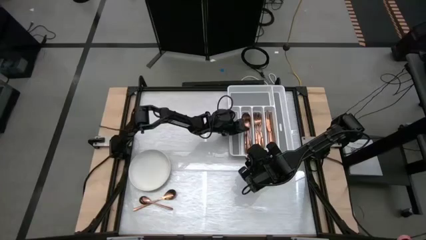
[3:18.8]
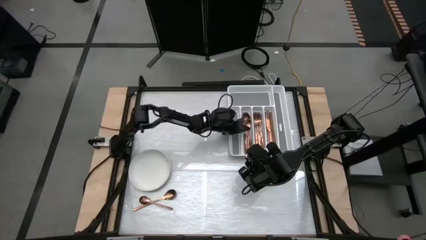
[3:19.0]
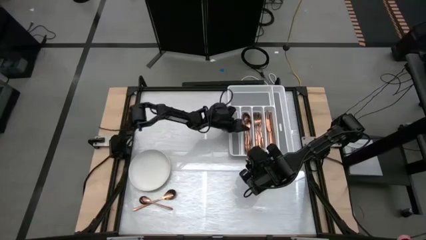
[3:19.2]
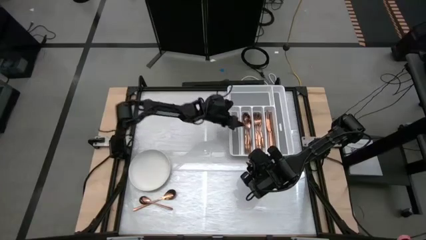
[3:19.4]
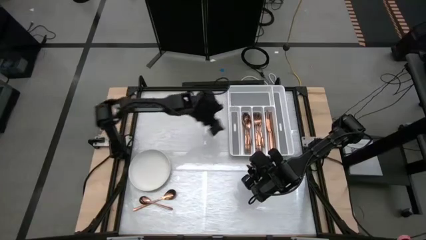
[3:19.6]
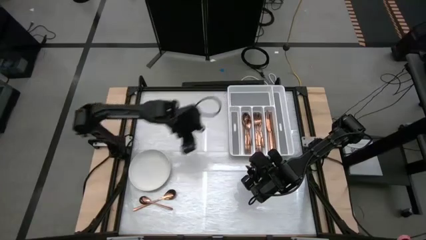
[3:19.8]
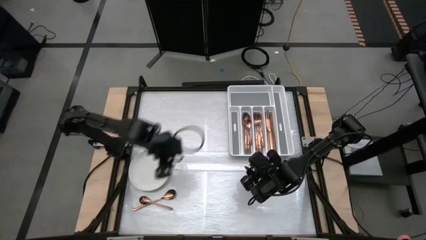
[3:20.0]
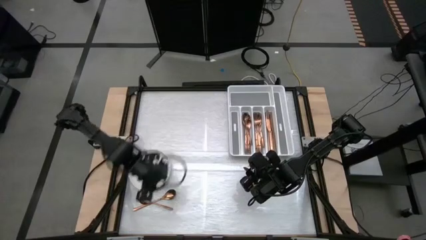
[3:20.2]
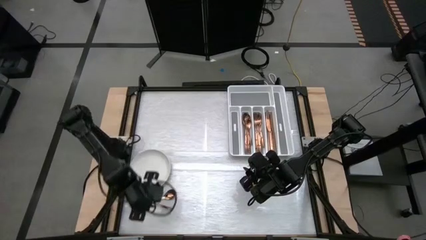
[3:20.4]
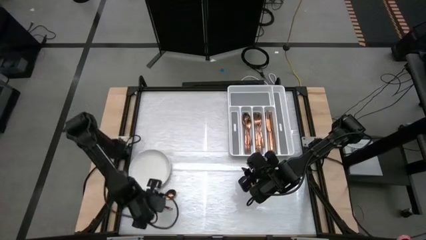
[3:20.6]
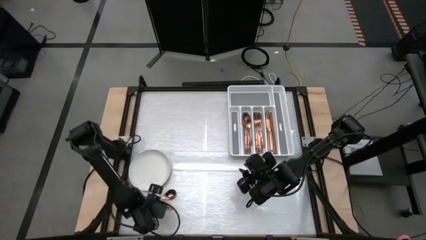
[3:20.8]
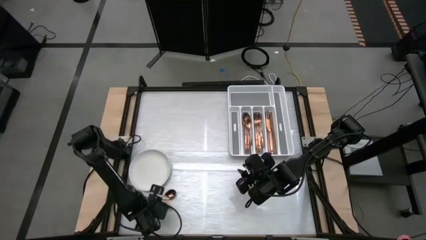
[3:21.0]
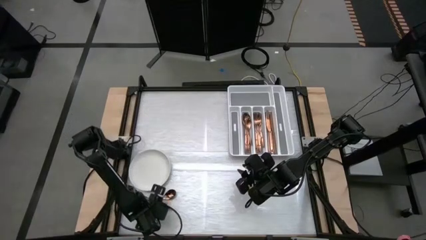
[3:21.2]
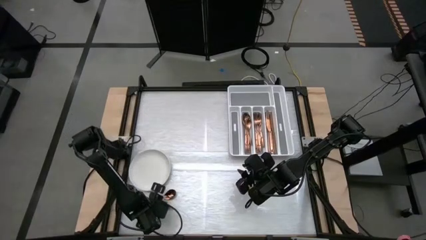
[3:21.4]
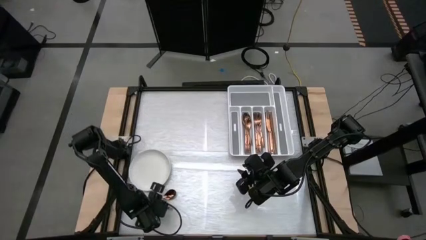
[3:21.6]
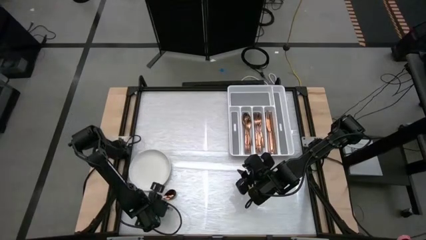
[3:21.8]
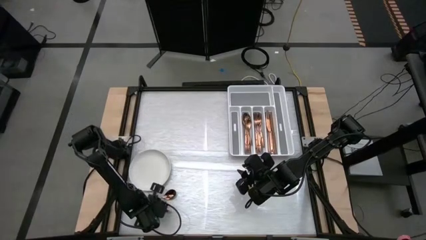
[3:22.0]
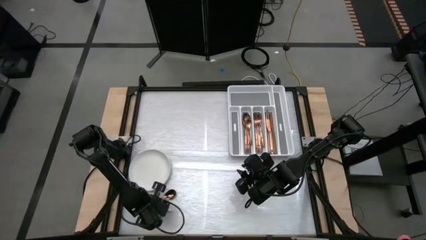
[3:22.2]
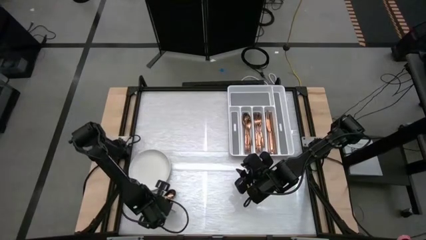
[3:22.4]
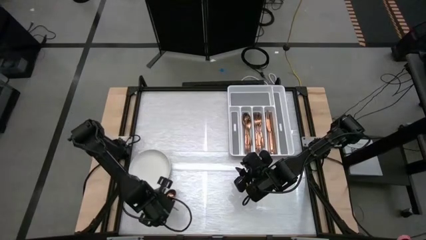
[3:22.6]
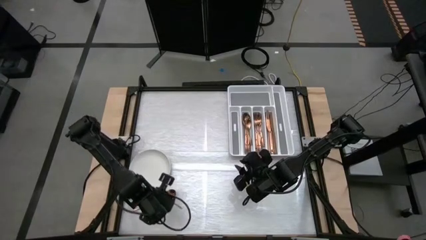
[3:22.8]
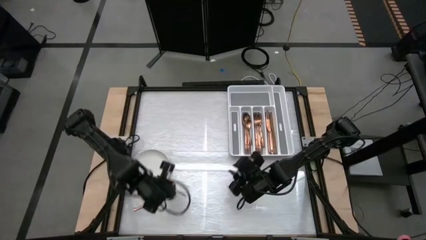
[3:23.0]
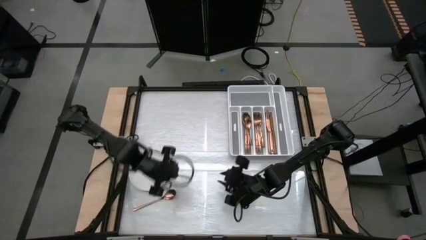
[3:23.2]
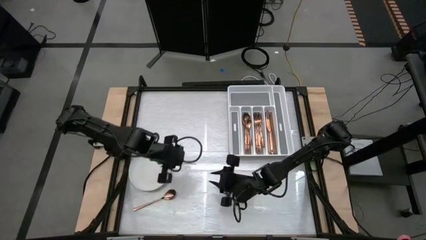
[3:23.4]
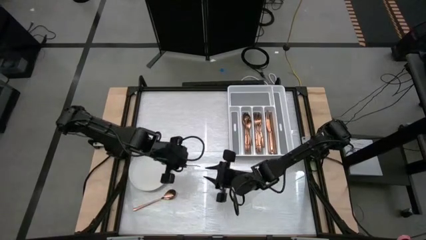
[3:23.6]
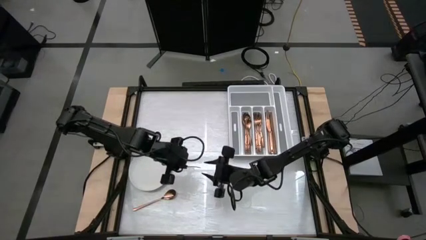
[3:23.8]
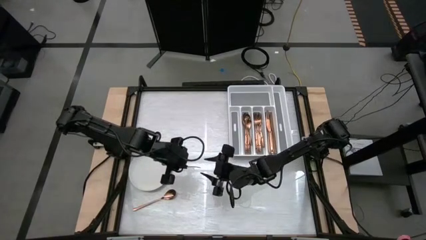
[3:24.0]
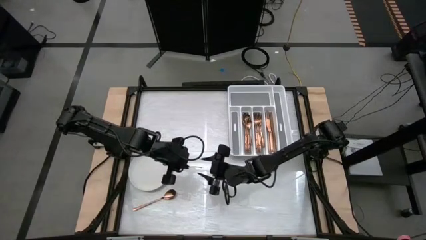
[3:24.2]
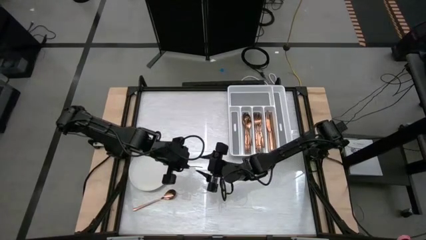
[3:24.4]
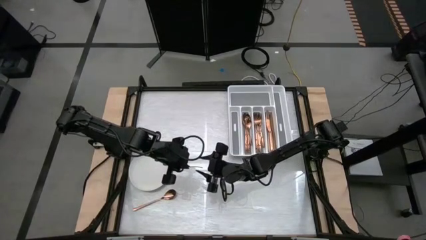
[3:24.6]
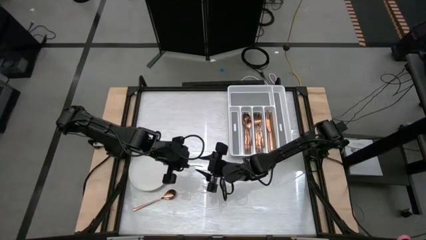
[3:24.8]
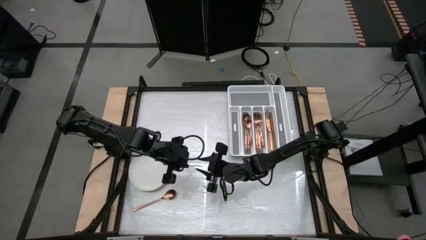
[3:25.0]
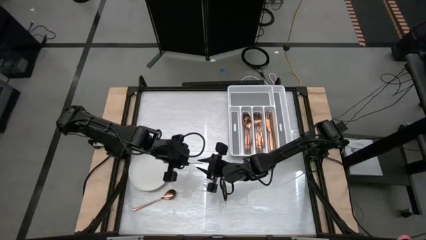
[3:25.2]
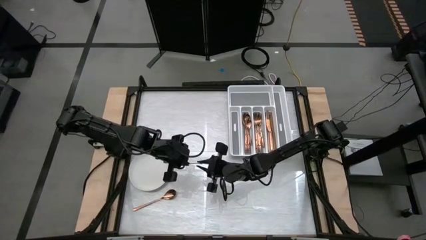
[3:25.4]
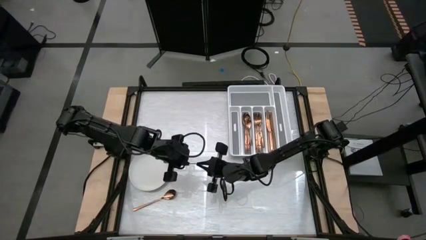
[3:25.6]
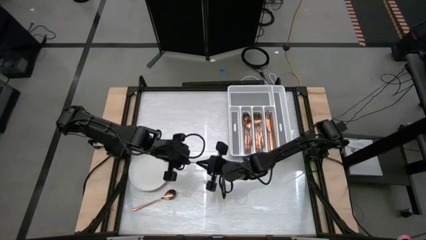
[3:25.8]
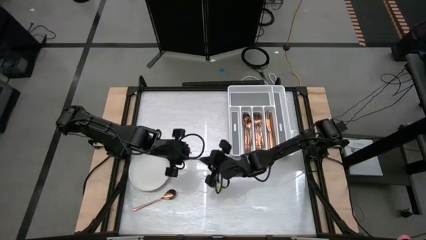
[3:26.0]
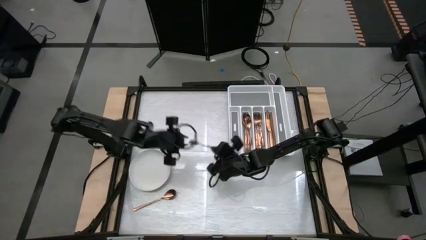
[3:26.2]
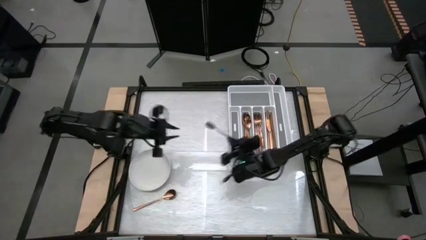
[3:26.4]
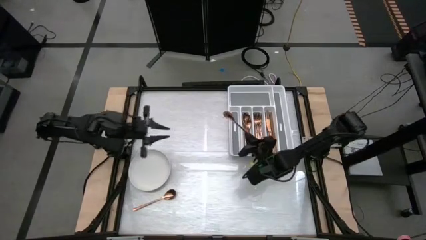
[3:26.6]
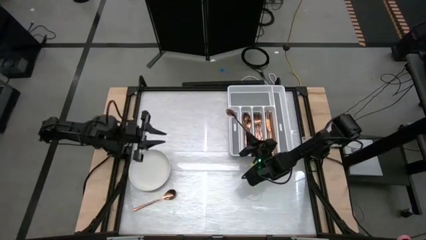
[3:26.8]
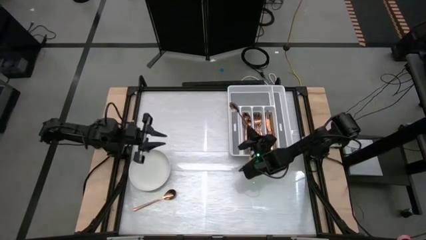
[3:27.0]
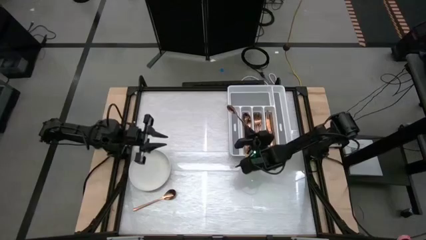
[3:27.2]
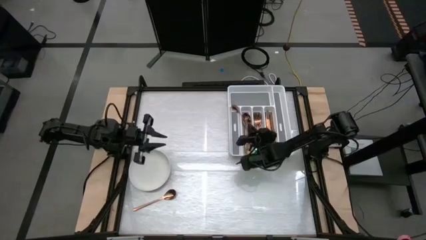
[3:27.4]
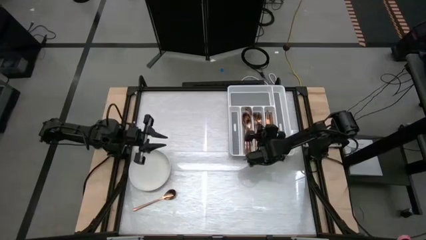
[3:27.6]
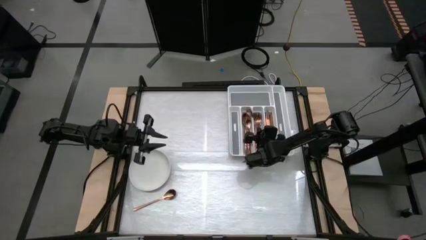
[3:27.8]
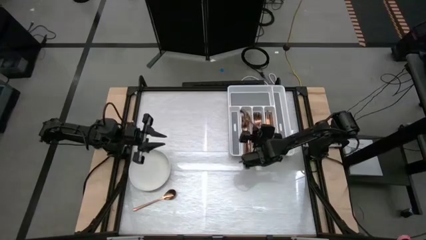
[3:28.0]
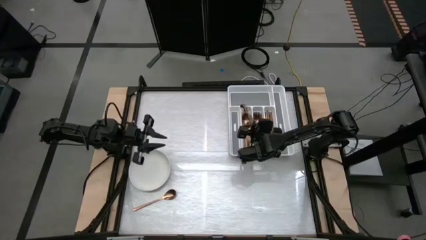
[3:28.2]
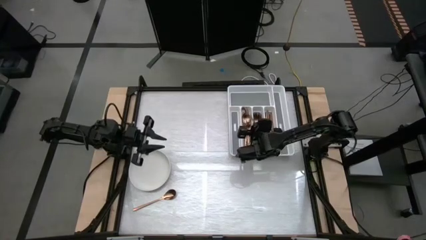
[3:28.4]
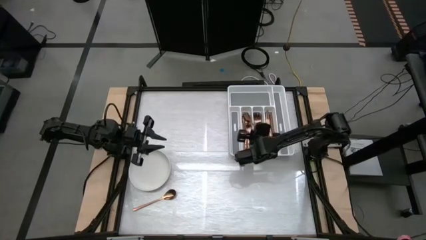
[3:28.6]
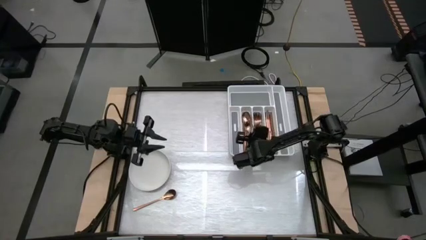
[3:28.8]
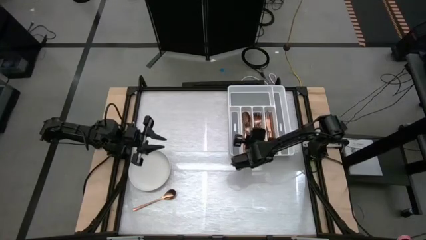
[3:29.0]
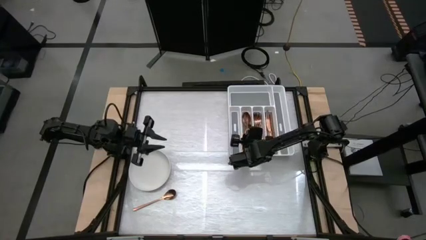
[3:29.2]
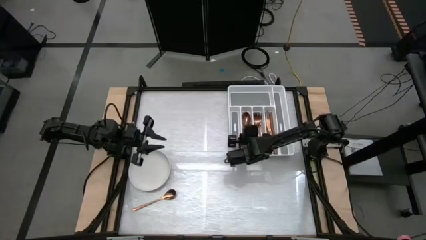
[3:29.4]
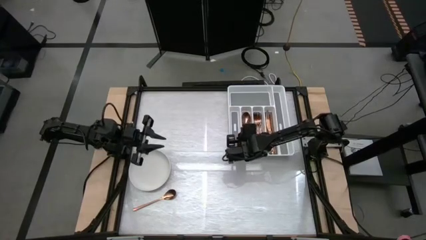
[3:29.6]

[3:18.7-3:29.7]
Task: Sort silverware
Put the bronze spoon into the silverware tray
